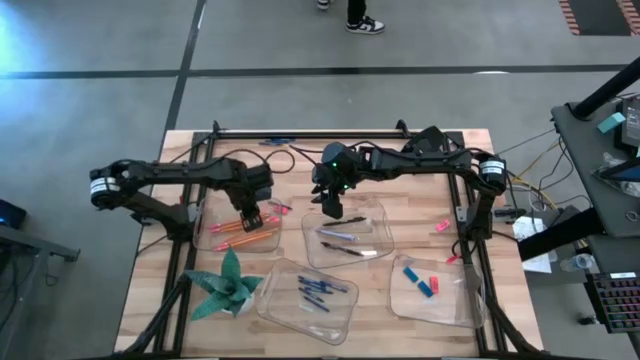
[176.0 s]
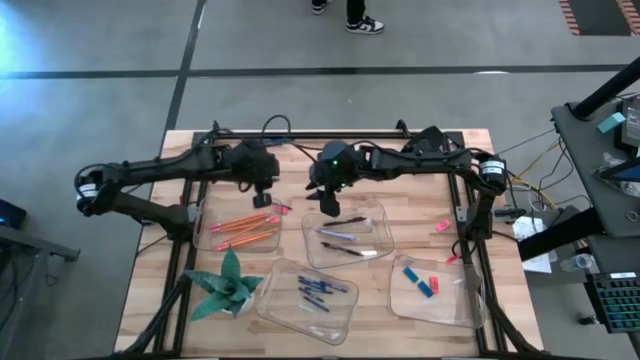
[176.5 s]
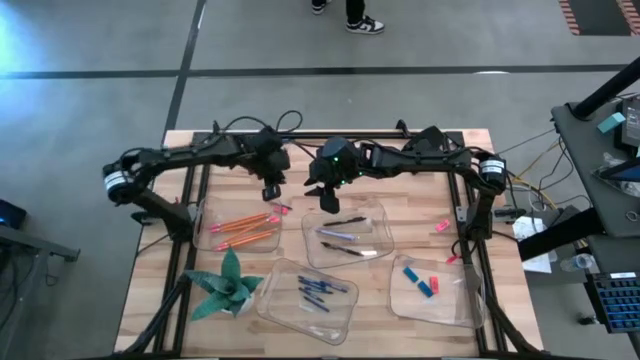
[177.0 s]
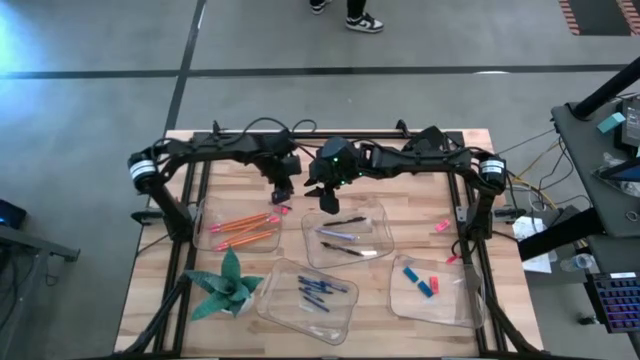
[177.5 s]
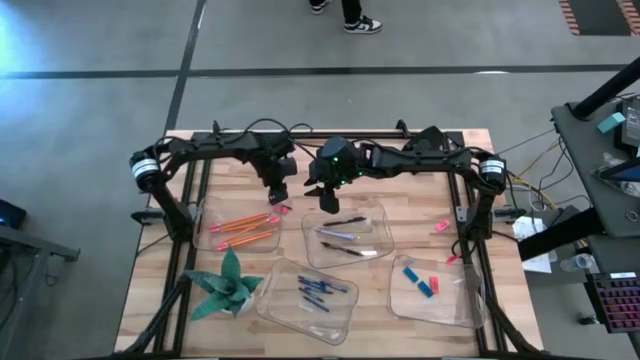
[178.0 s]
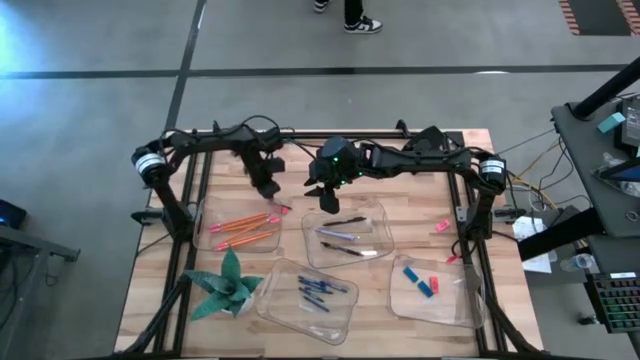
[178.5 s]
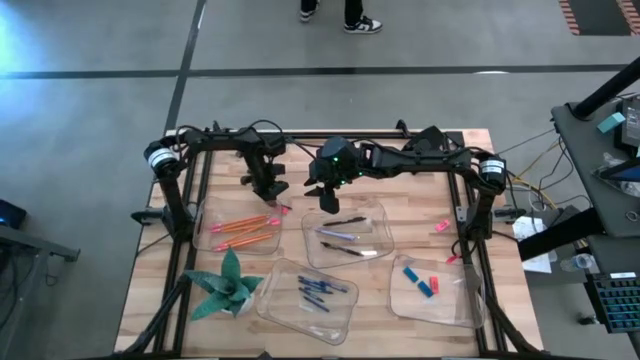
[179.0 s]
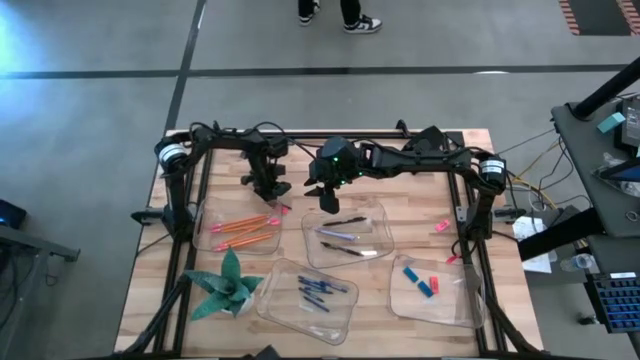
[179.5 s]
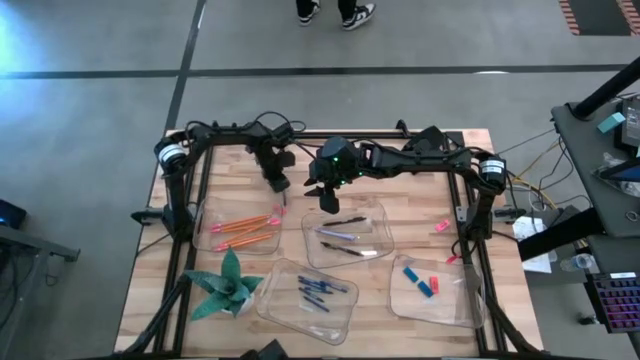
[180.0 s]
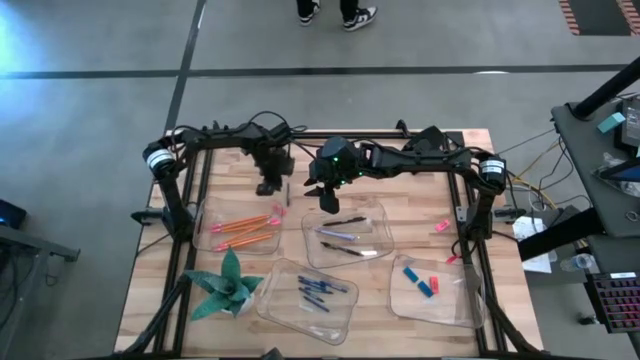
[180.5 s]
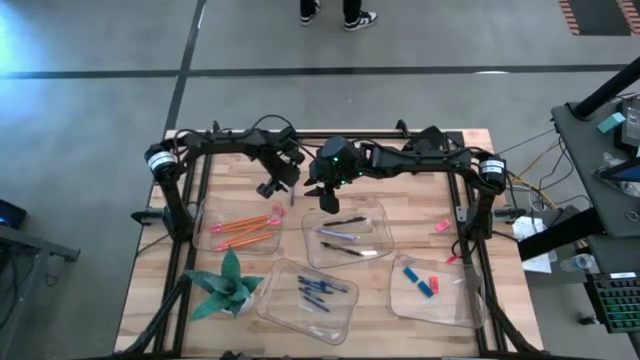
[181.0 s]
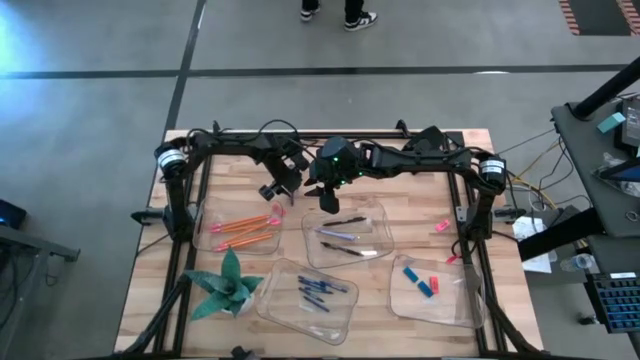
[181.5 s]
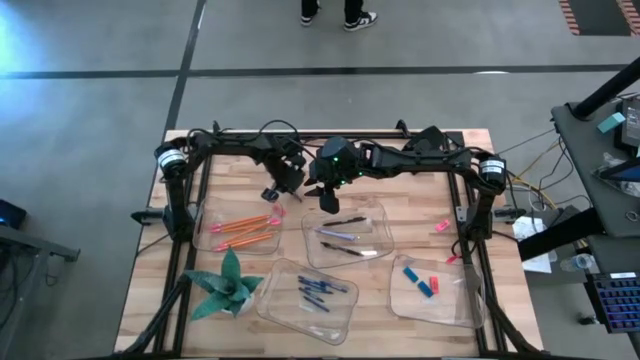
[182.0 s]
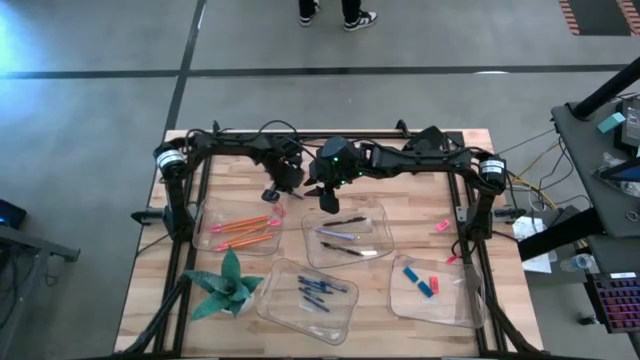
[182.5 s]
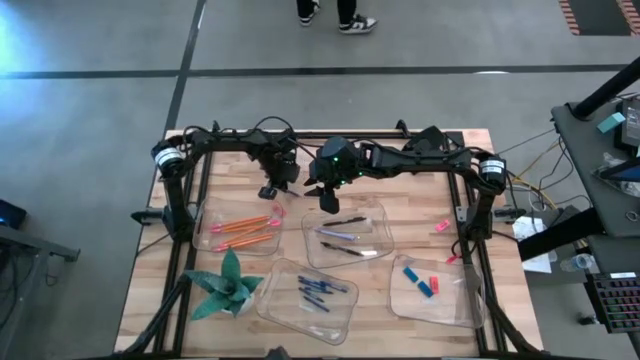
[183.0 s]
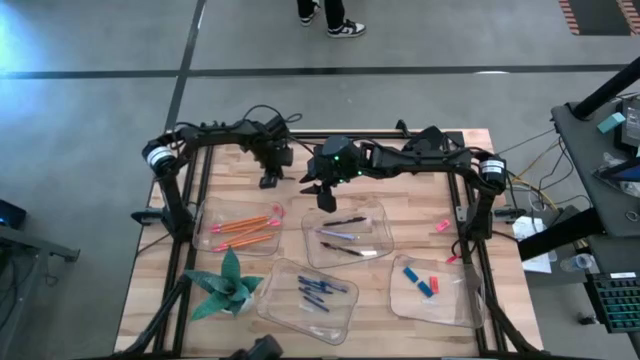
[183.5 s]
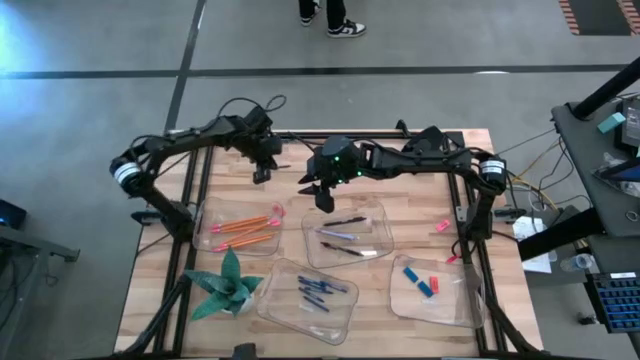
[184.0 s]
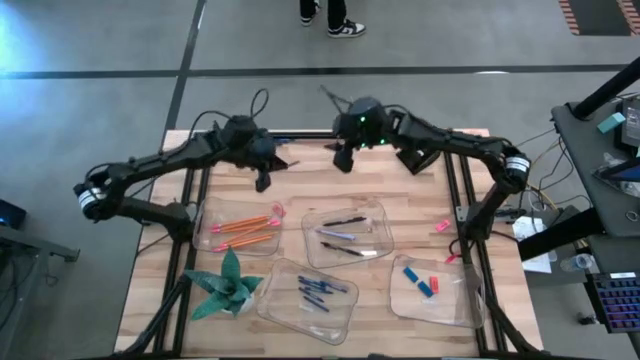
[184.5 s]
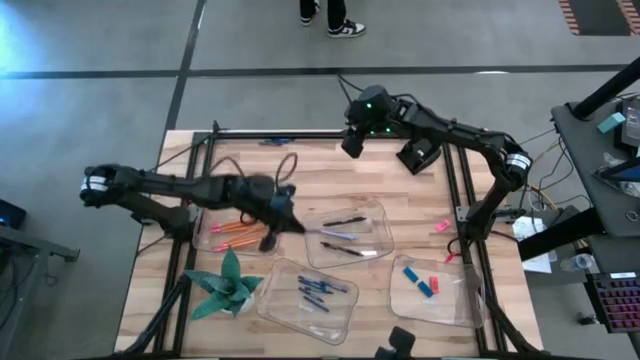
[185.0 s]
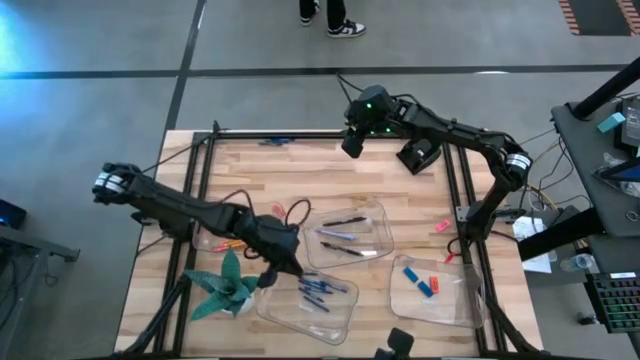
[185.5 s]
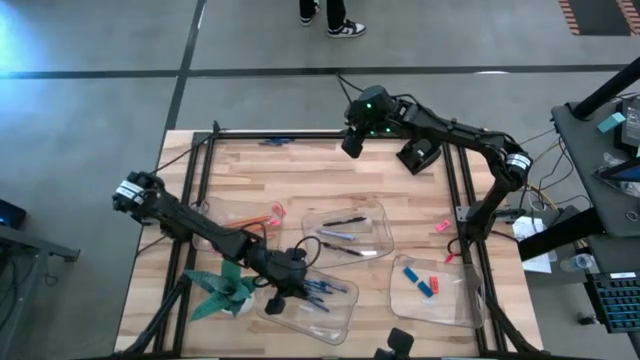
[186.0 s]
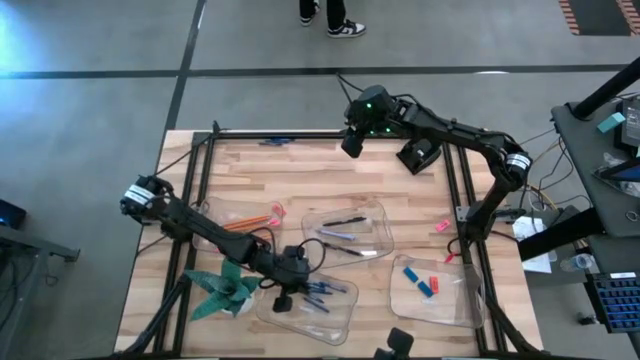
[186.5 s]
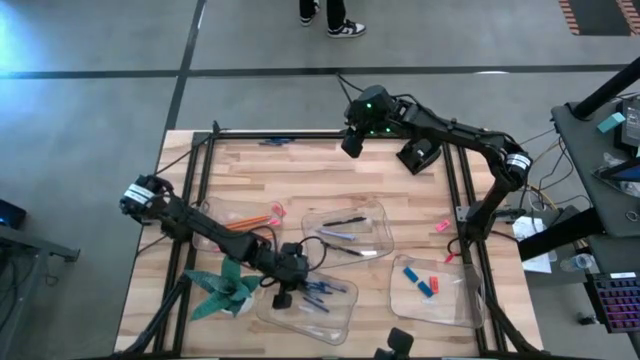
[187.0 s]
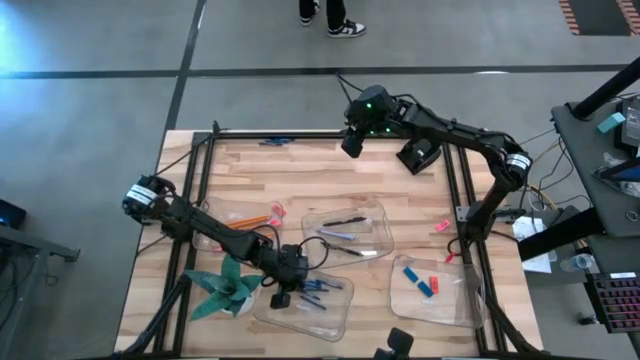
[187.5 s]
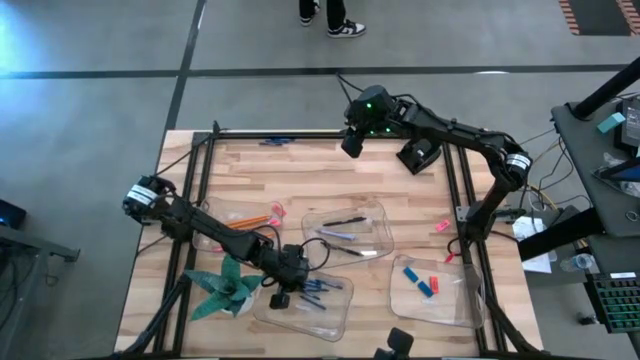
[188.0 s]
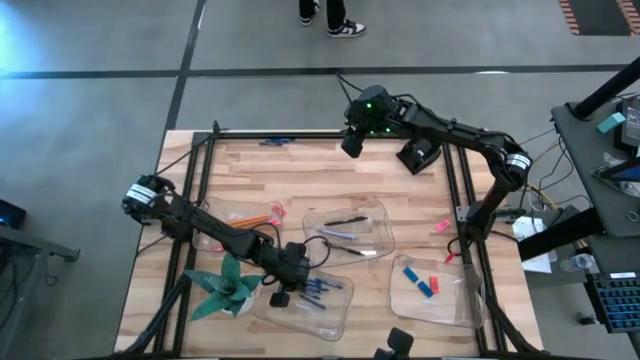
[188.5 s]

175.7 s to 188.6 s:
Task: Sort crayons/erasers/pens/pencils in bins
Put the blue crayon into the bottom left transparent bin

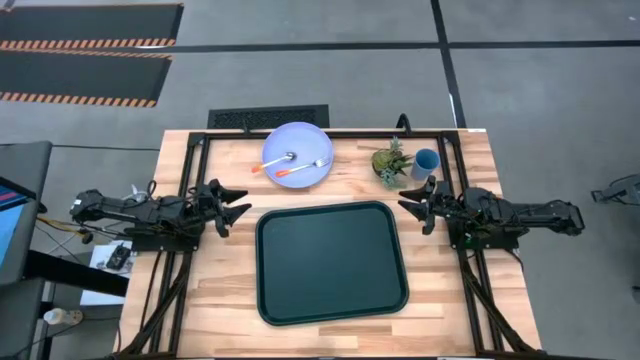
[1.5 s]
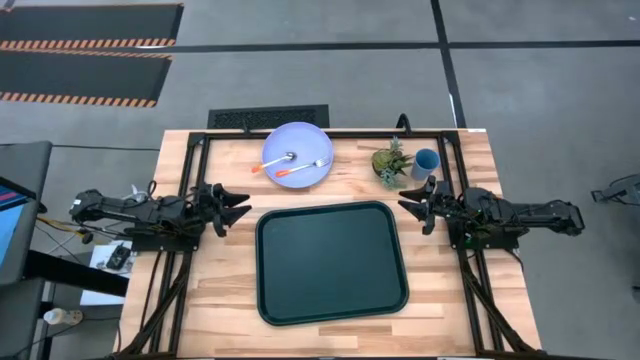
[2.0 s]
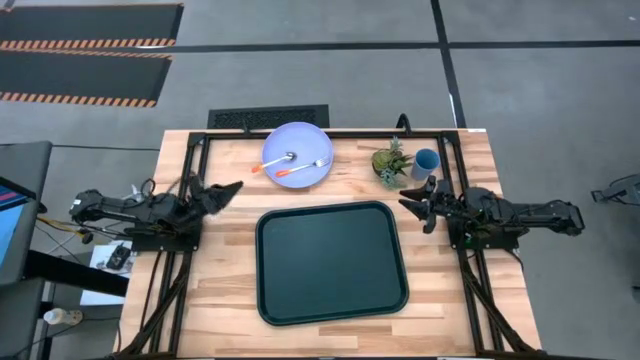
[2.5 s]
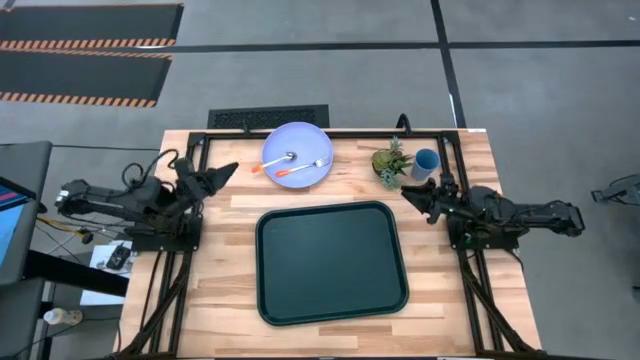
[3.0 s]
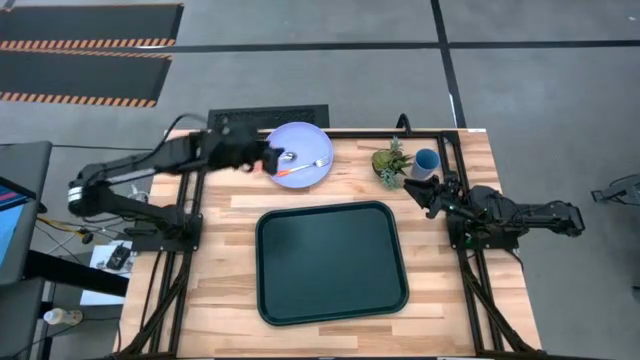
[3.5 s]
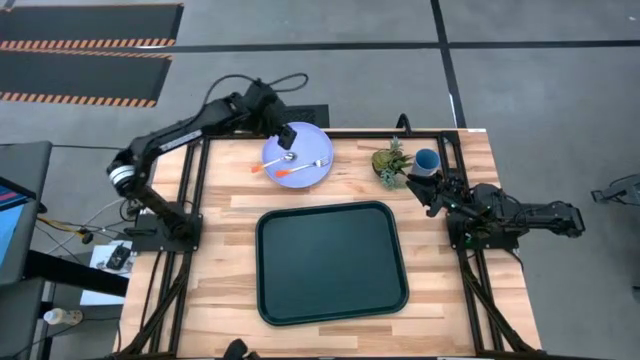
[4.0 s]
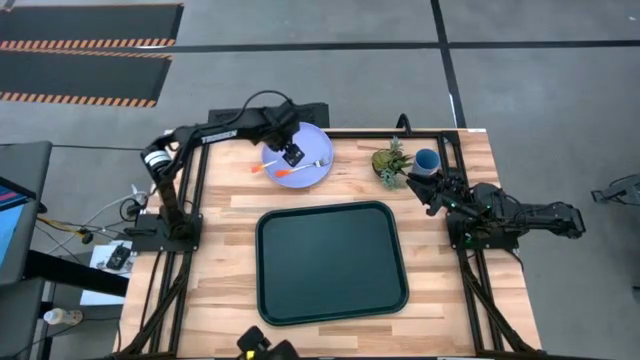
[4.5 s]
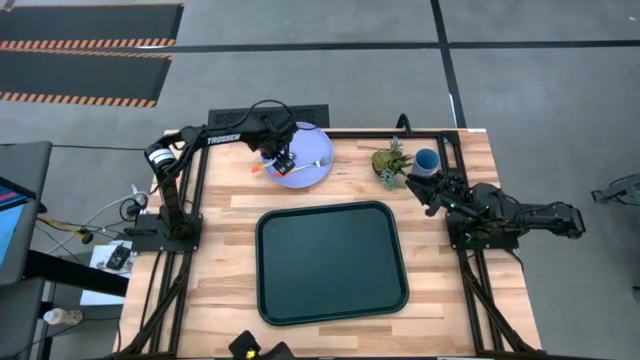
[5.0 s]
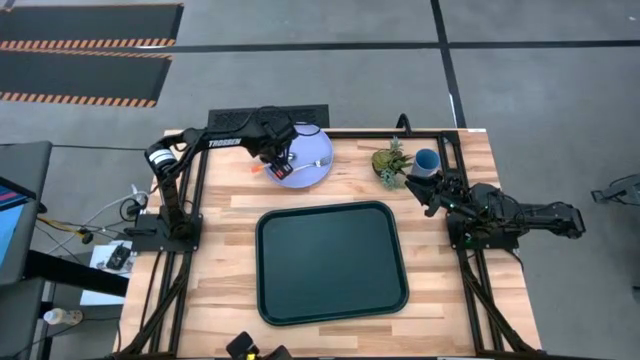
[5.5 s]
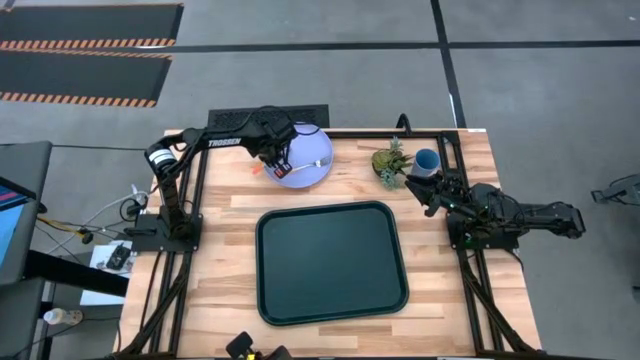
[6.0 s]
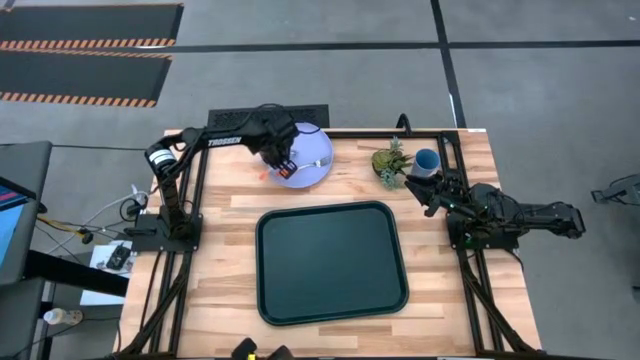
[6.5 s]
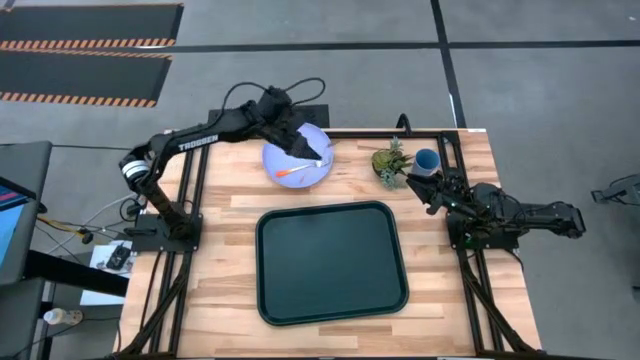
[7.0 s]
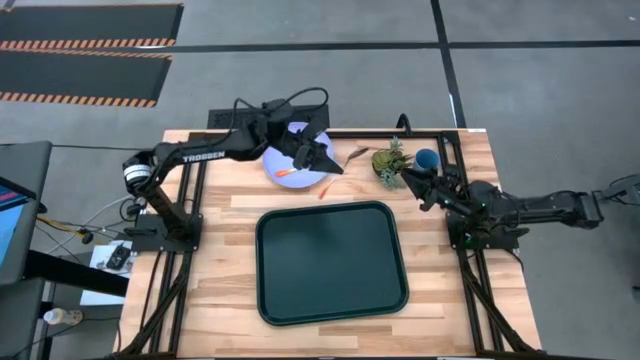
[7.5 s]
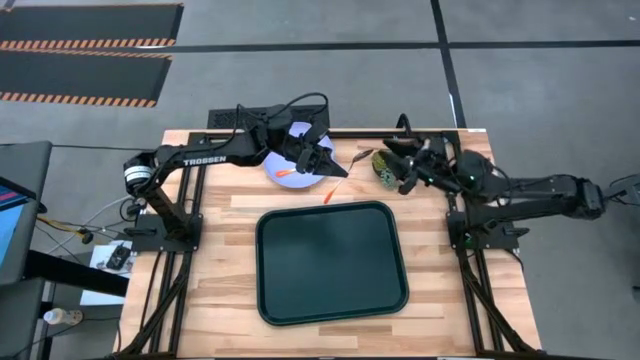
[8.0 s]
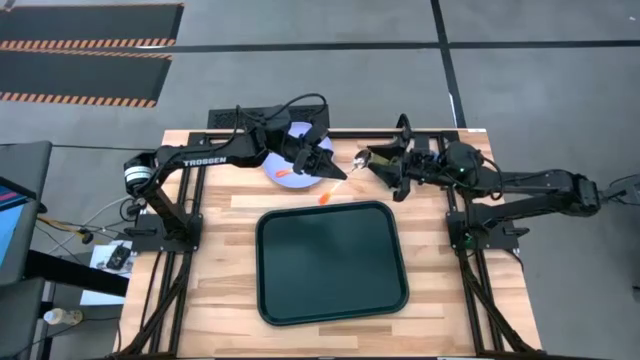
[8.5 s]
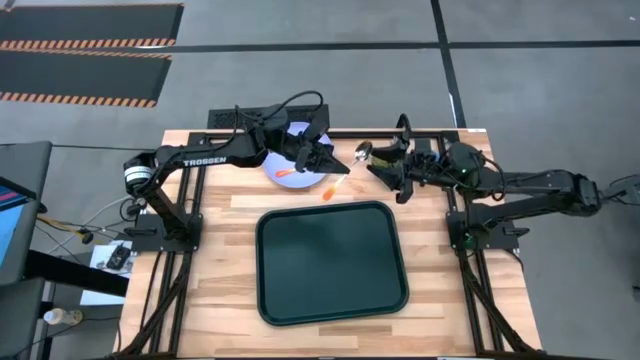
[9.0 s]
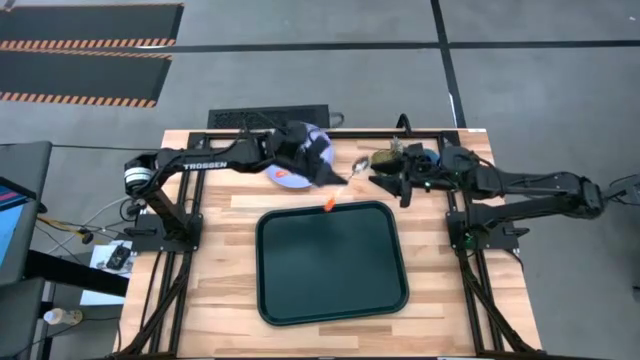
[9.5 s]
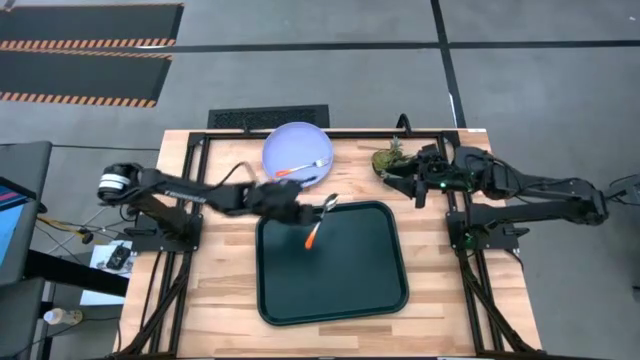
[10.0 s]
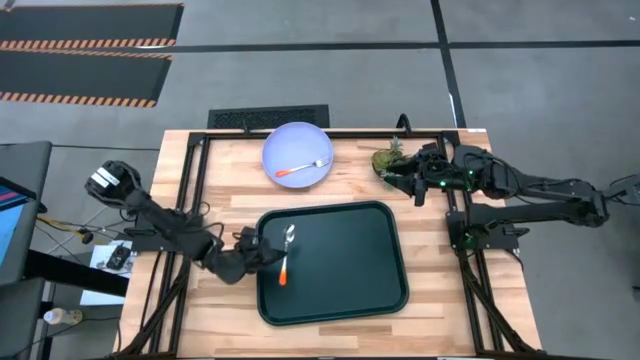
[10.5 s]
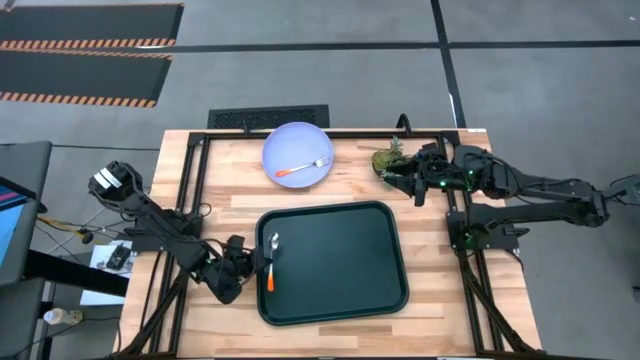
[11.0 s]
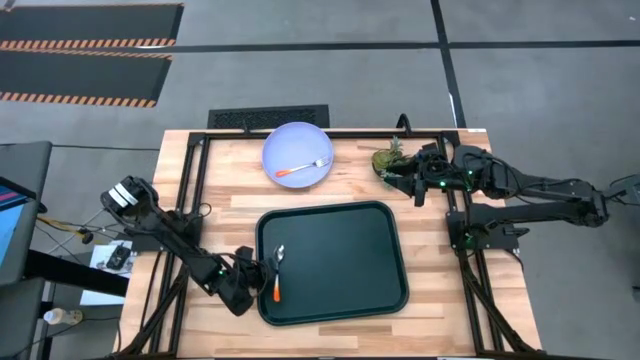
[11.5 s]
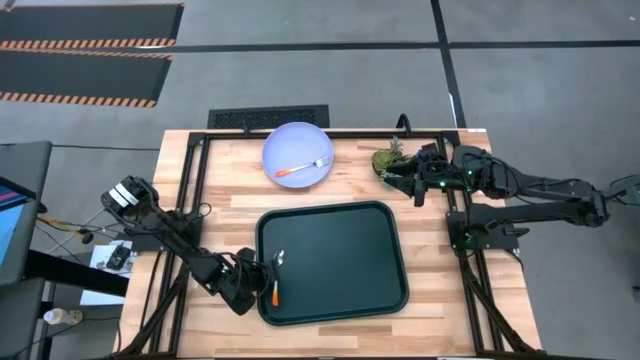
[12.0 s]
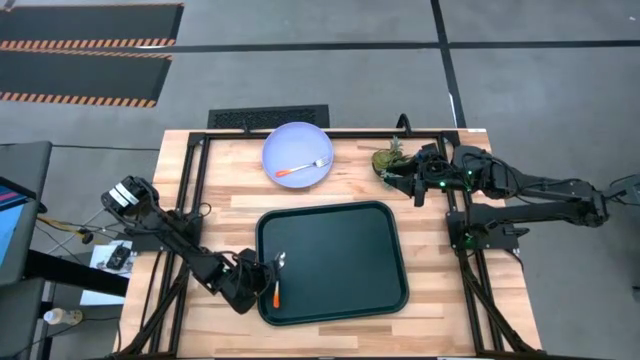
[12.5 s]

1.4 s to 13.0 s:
Task: Pick and place plate/cup/fork/spoon on tray
Put the orange spoon on the bottom left of the black tray
